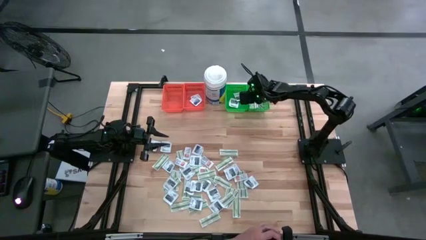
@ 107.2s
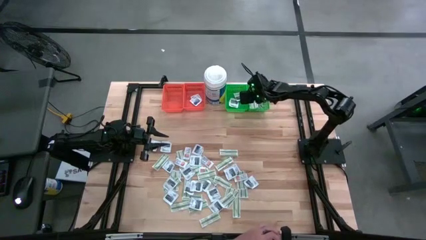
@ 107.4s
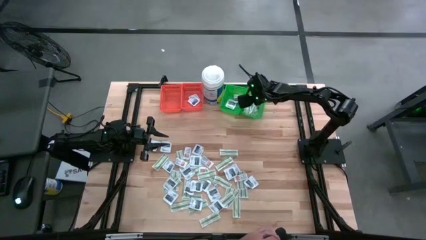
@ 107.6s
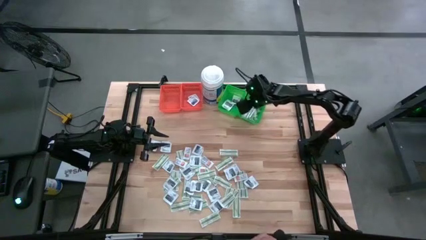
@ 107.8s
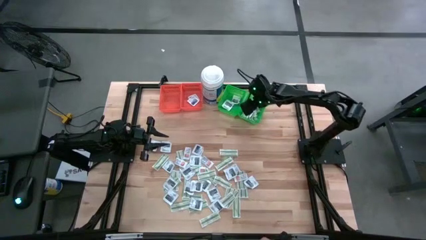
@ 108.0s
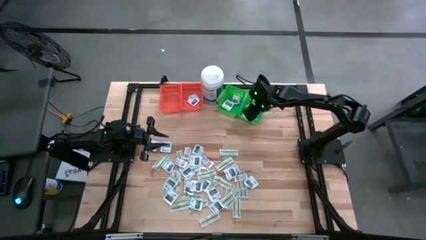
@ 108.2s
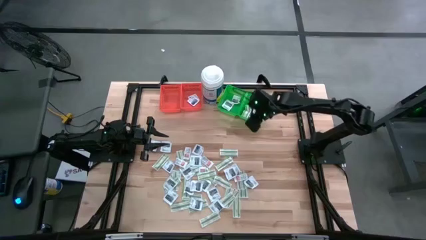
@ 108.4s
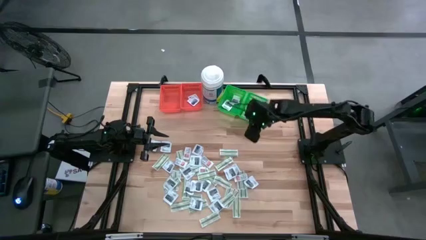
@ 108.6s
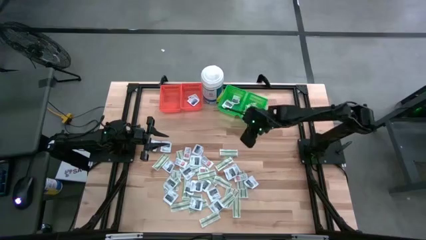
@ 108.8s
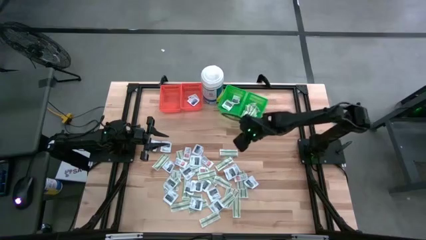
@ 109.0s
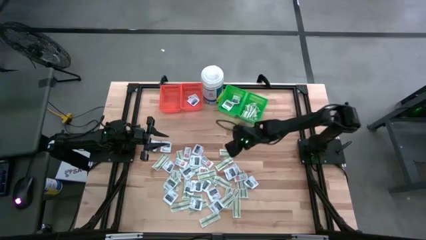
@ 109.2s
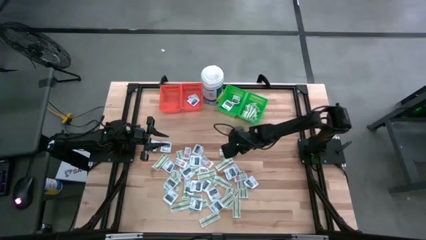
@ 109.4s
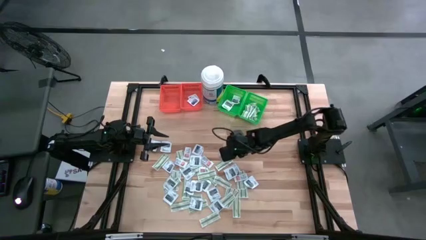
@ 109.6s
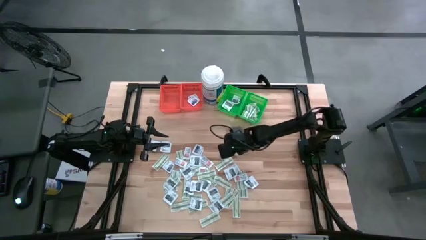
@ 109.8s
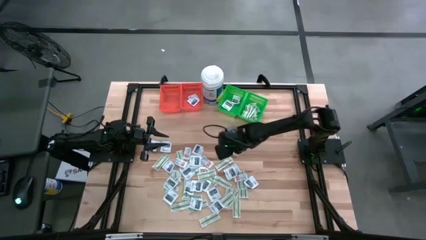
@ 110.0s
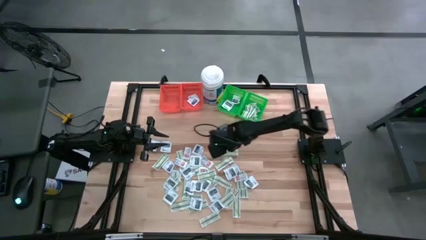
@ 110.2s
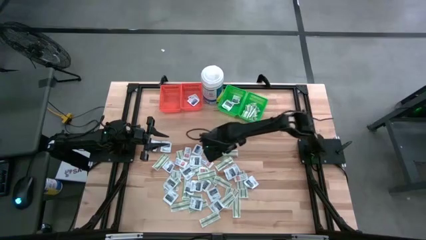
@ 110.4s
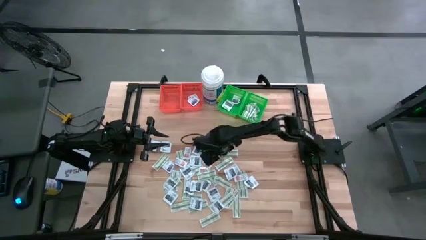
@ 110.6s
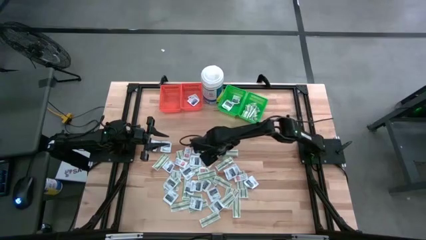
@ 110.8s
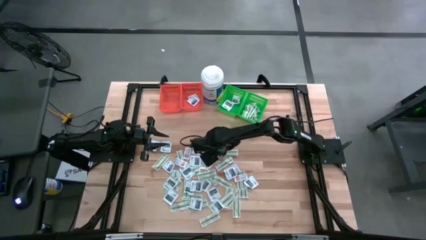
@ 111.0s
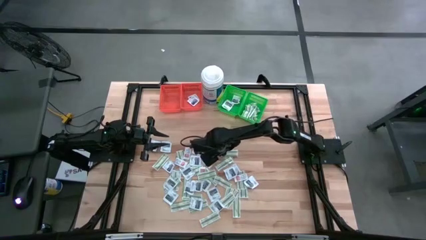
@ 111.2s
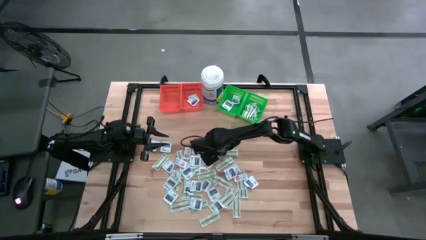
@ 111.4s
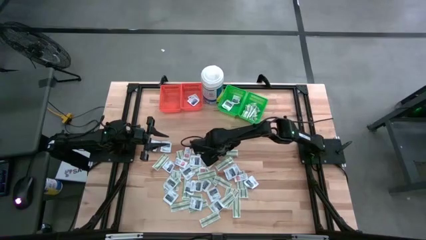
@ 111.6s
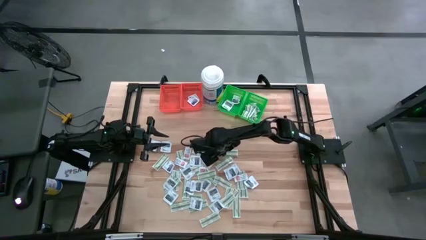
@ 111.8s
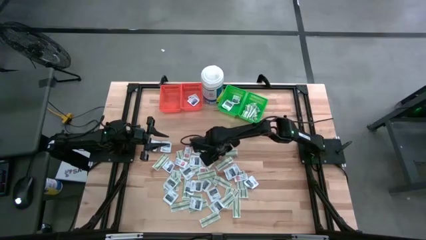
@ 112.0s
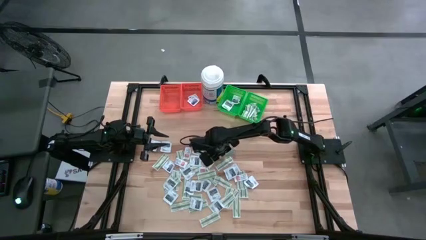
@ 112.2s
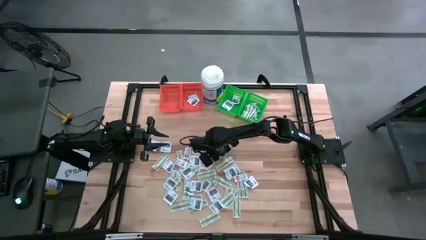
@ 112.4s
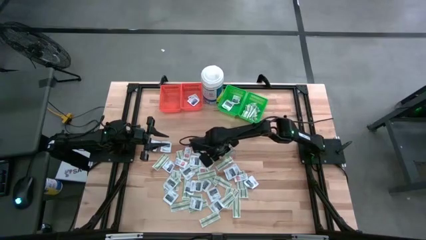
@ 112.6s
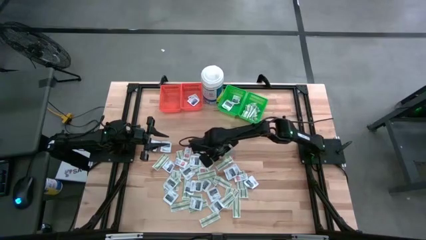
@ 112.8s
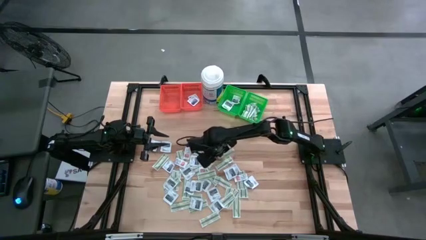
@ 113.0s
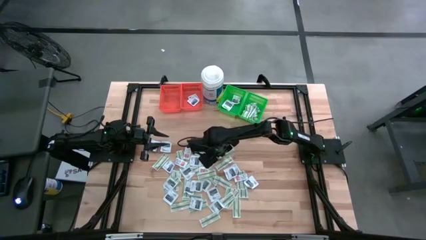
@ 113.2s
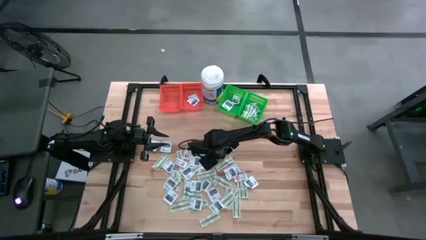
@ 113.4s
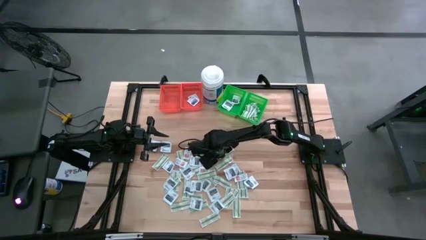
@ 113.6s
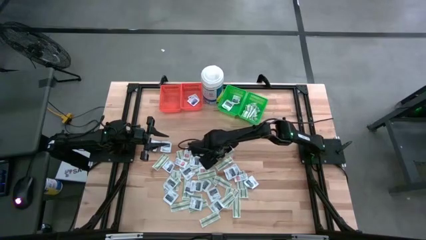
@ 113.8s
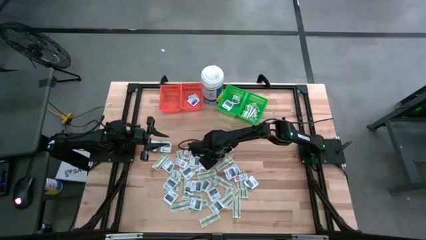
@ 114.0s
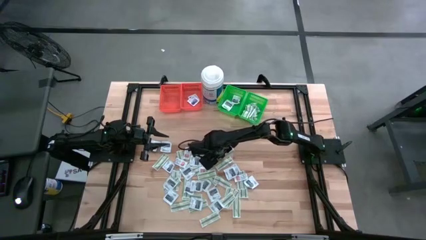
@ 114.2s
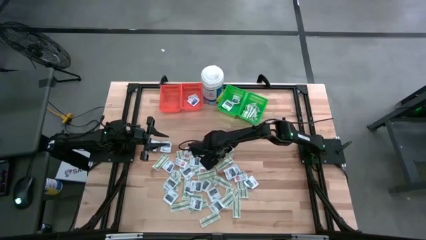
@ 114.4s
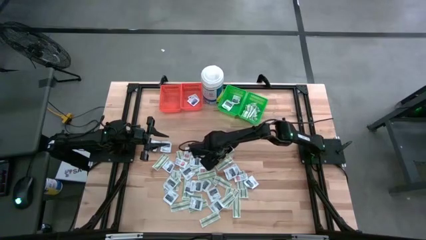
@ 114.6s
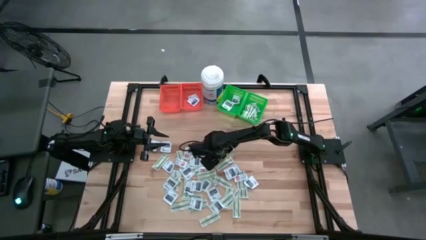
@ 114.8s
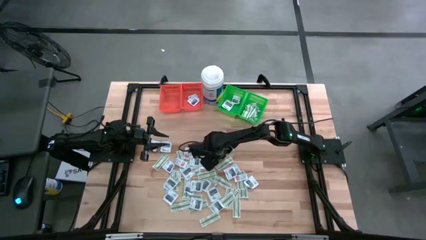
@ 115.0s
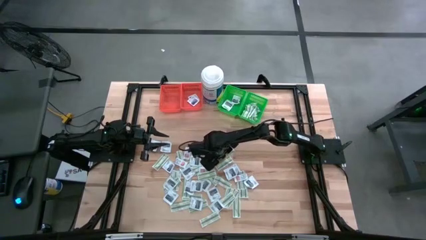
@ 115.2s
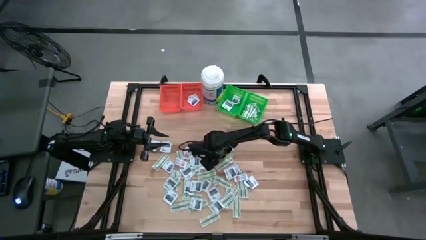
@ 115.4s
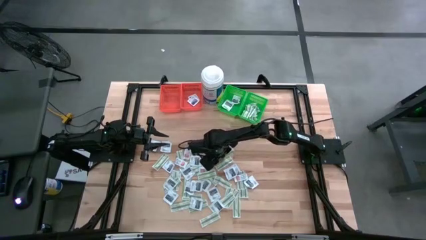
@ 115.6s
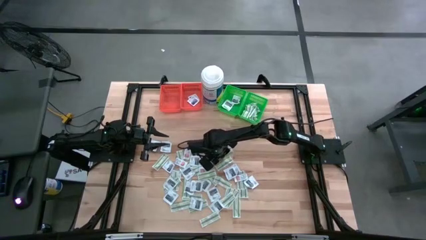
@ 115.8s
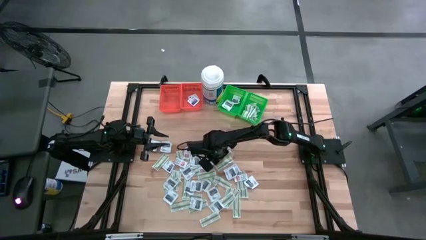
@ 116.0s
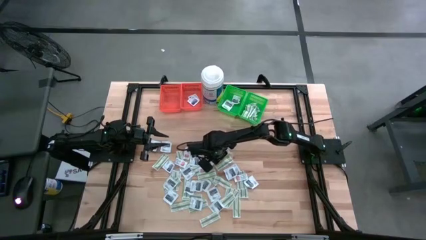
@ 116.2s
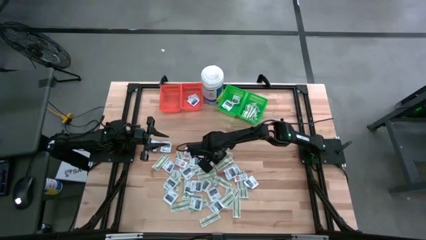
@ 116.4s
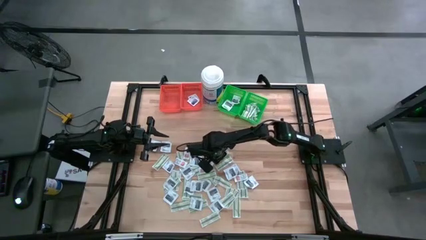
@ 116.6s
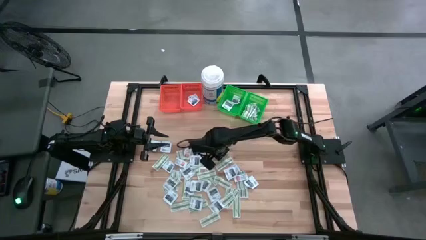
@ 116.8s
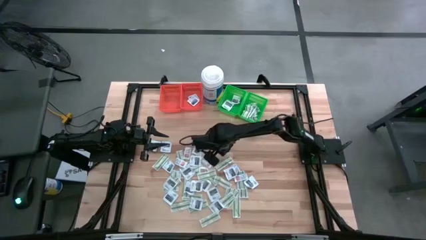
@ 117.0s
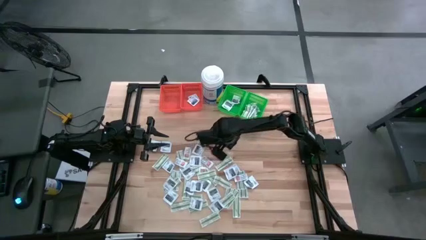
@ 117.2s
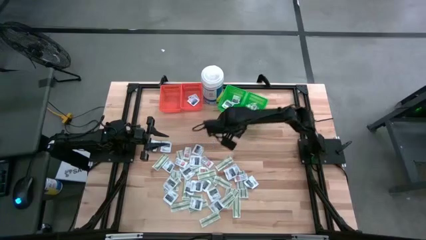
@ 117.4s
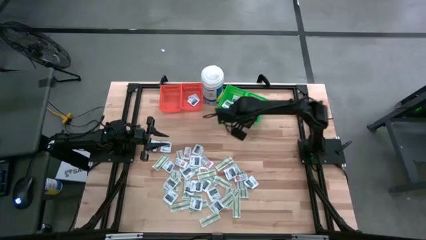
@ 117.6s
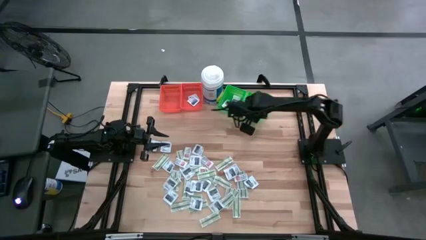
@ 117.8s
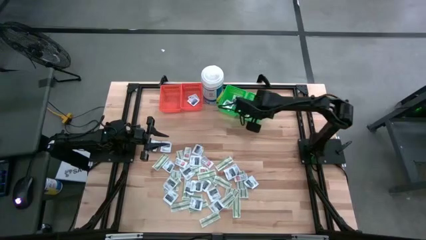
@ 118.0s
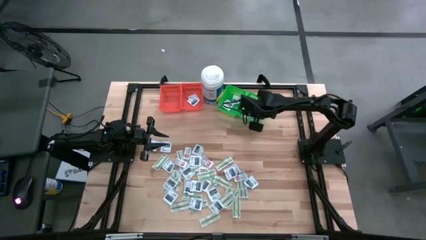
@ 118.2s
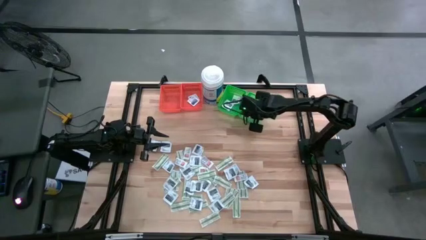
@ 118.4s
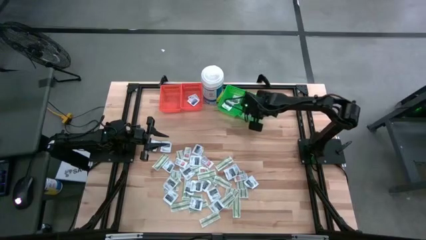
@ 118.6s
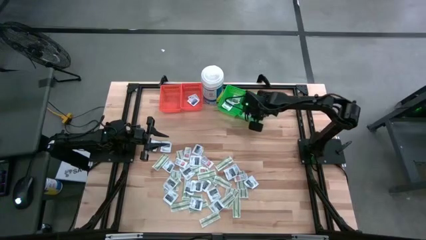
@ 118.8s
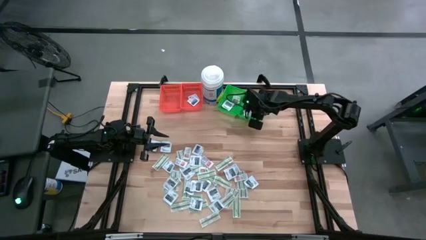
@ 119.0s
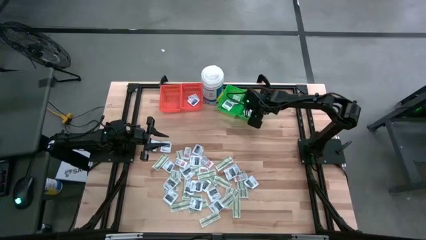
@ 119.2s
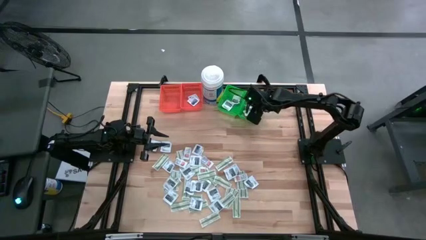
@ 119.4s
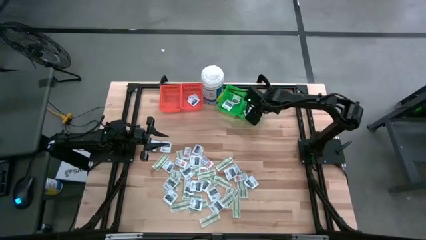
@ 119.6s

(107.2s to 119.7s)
Task: Pick & Place First Aid Supplies
Put the green bandage pack into the right green bin
